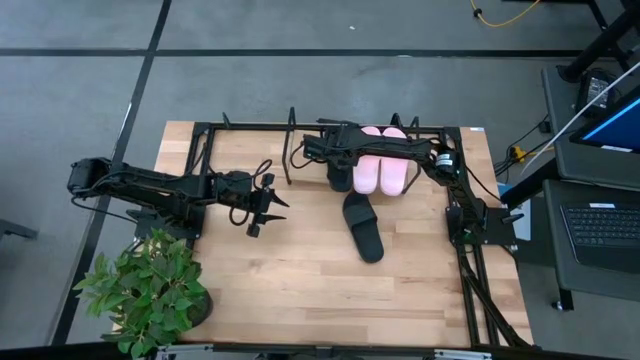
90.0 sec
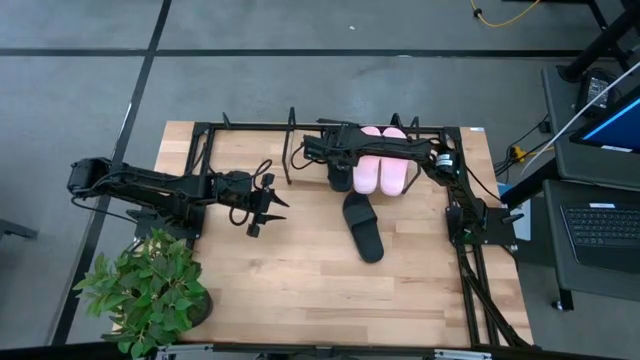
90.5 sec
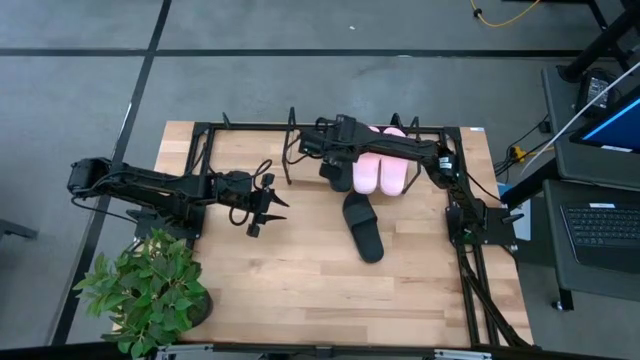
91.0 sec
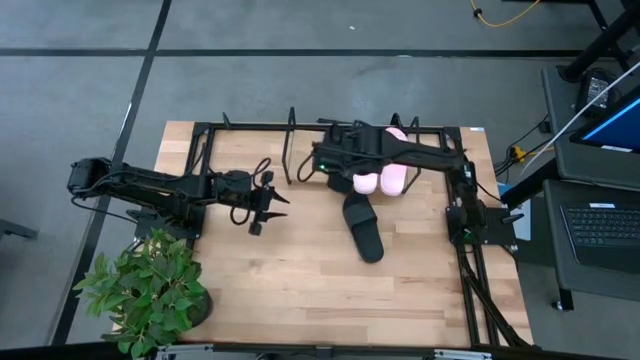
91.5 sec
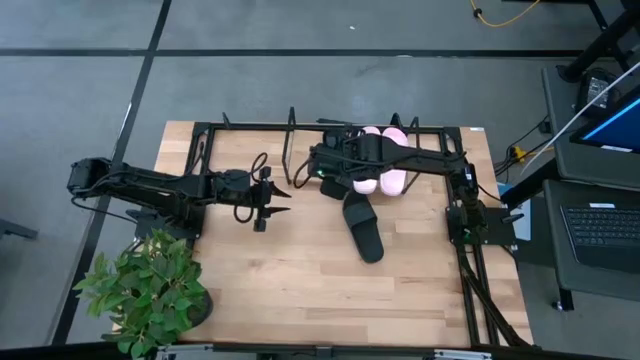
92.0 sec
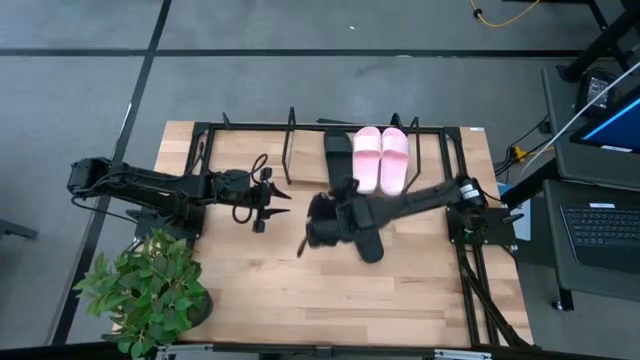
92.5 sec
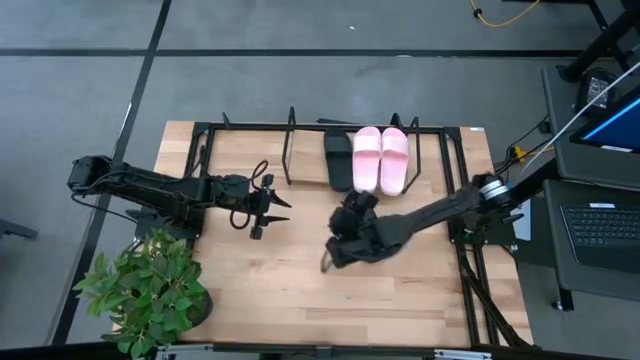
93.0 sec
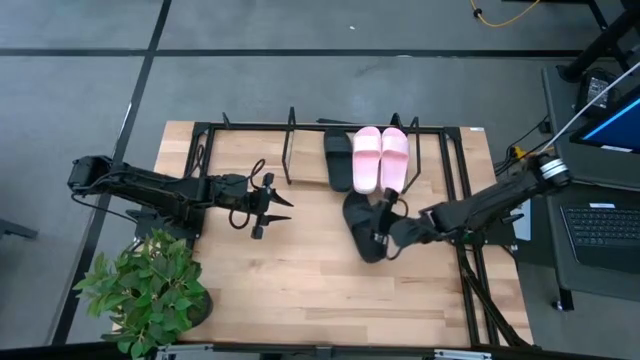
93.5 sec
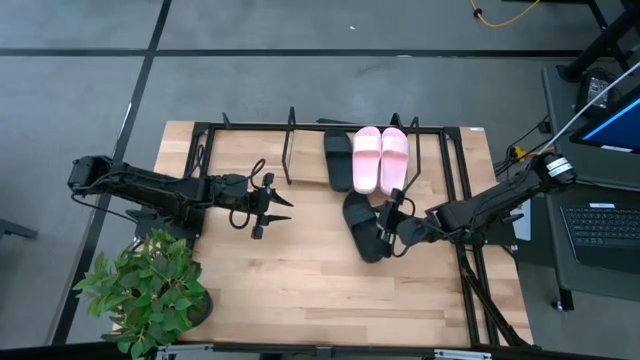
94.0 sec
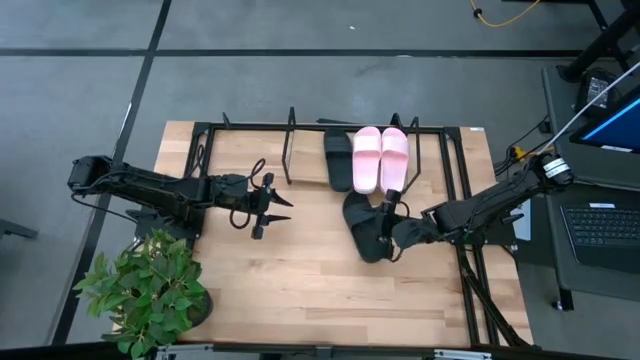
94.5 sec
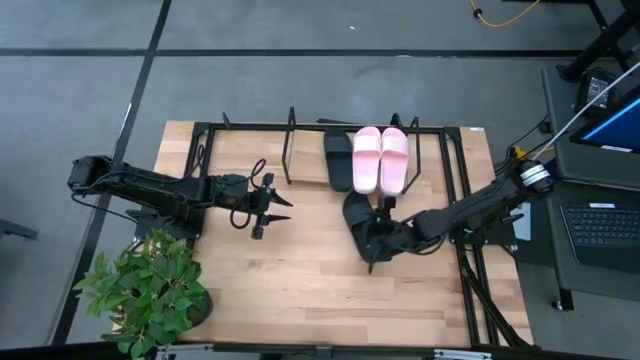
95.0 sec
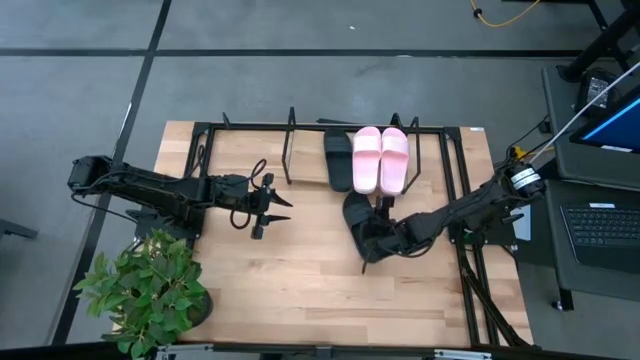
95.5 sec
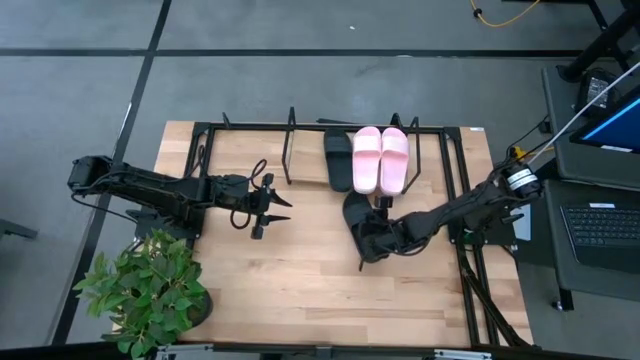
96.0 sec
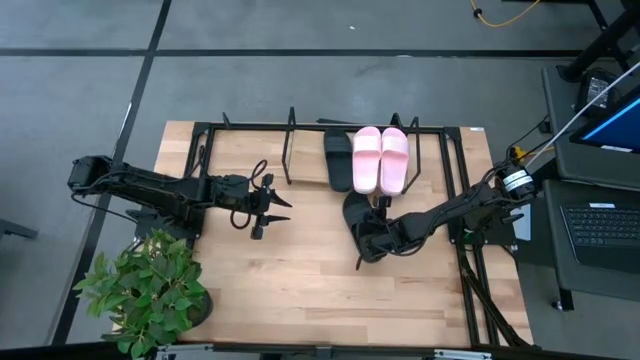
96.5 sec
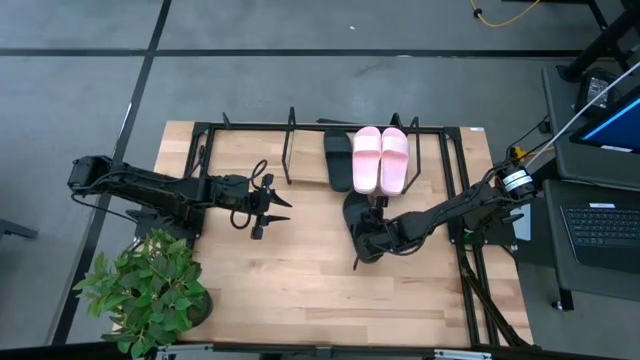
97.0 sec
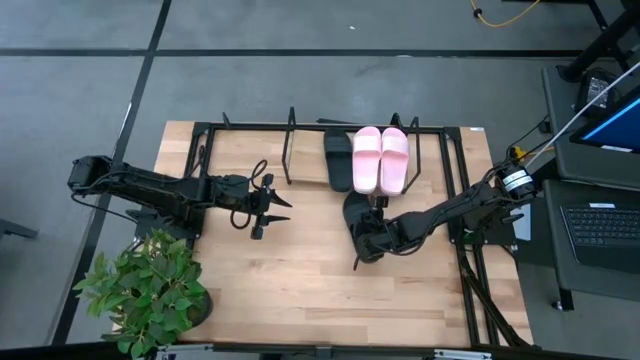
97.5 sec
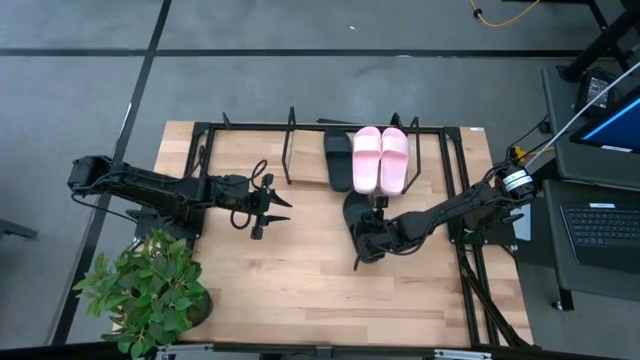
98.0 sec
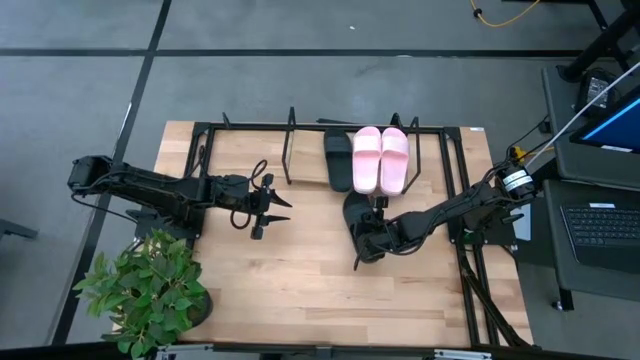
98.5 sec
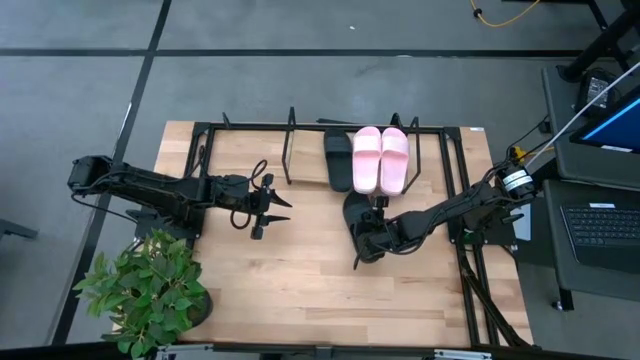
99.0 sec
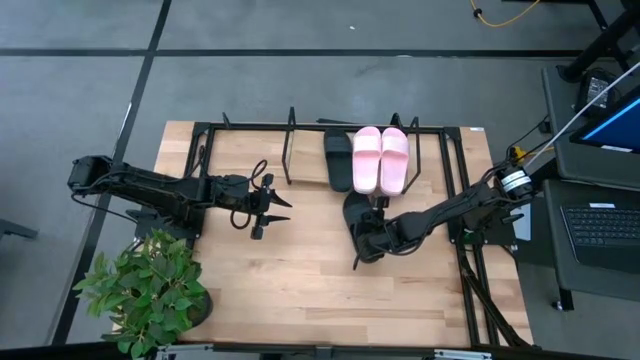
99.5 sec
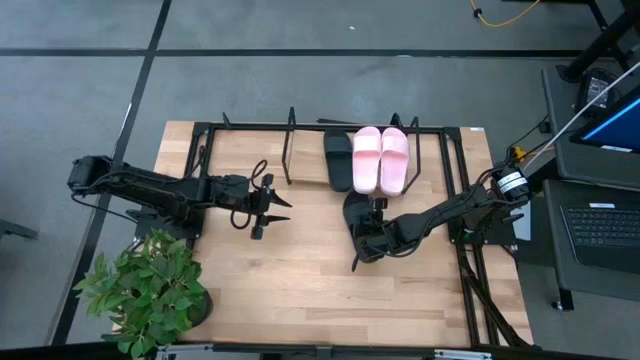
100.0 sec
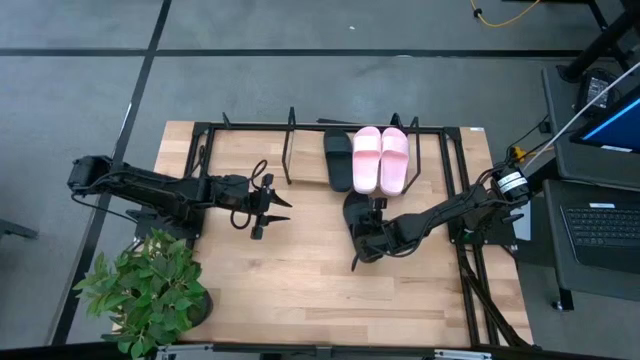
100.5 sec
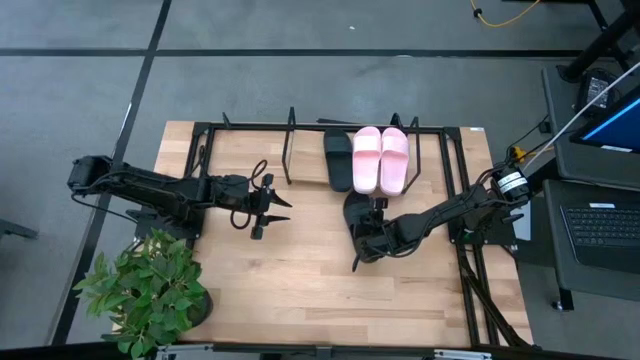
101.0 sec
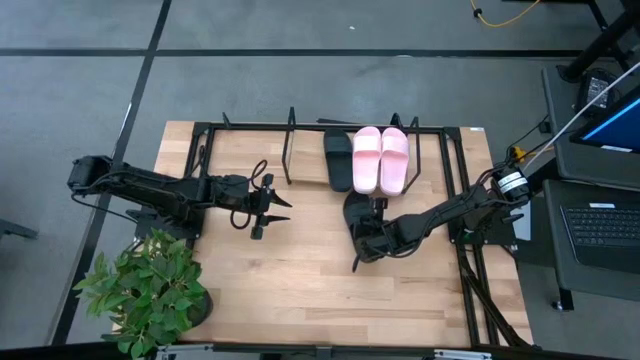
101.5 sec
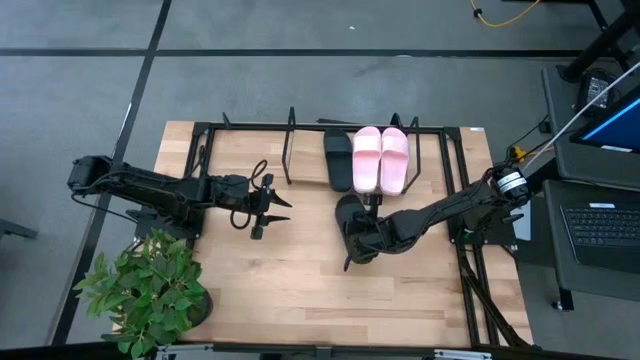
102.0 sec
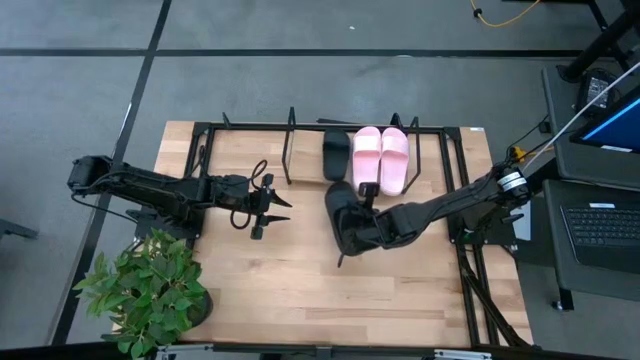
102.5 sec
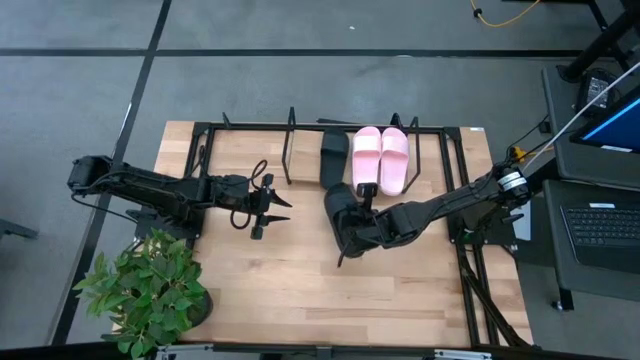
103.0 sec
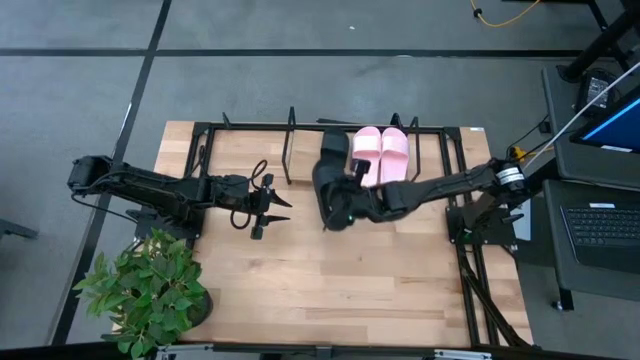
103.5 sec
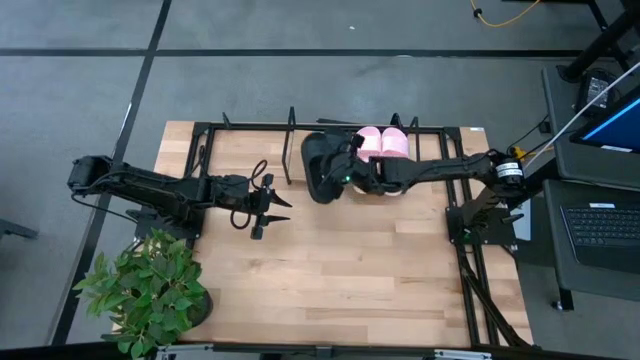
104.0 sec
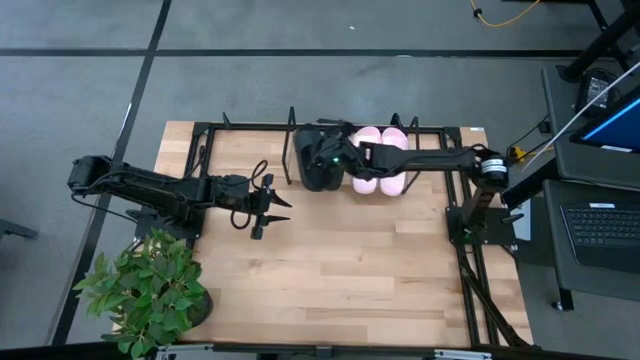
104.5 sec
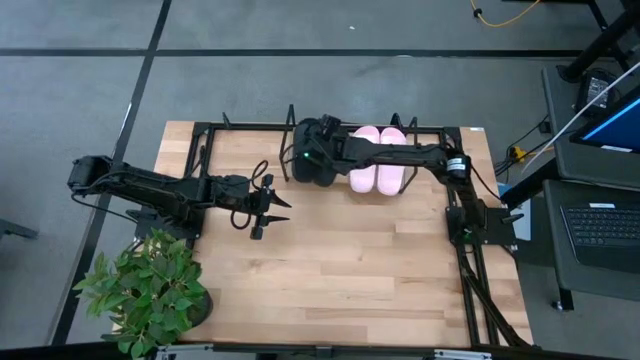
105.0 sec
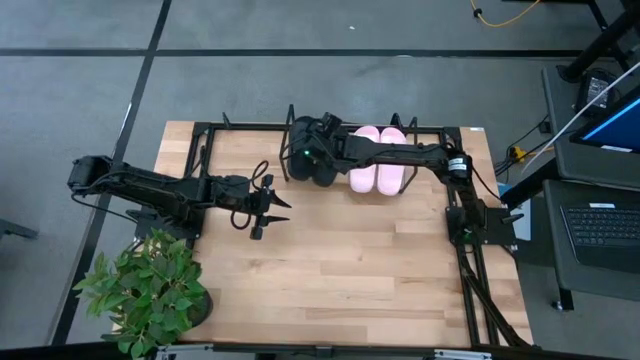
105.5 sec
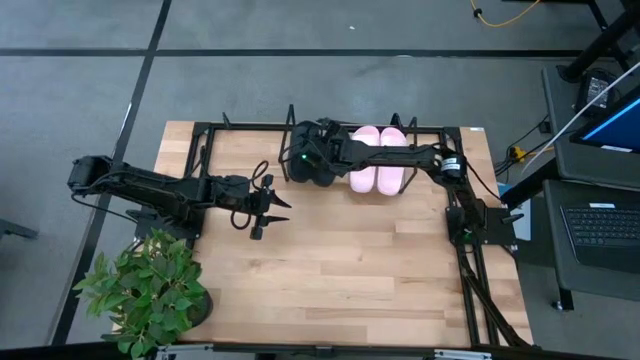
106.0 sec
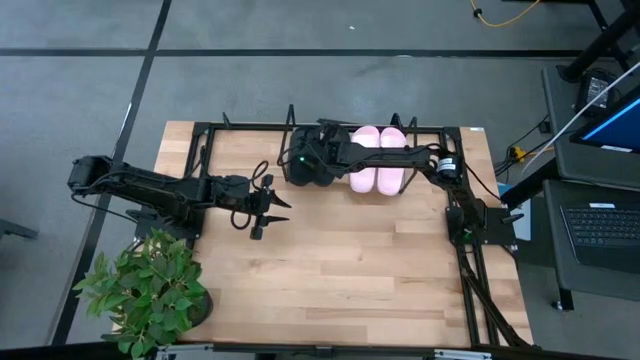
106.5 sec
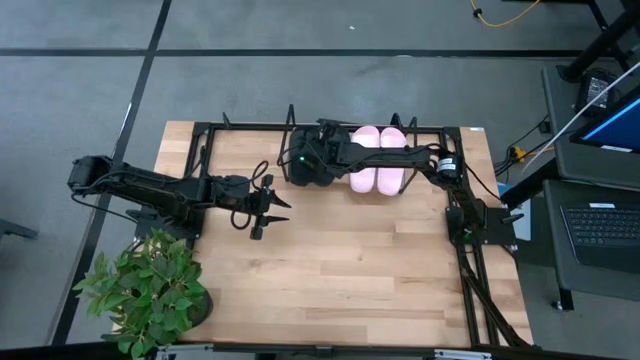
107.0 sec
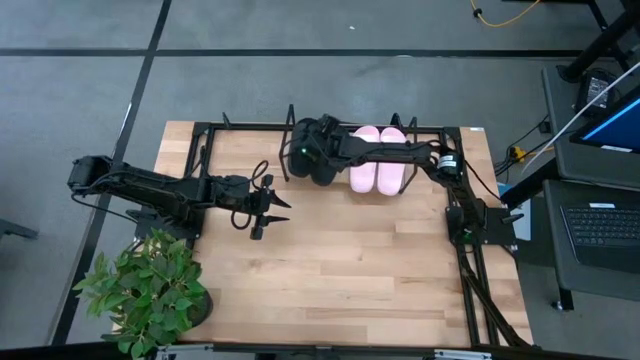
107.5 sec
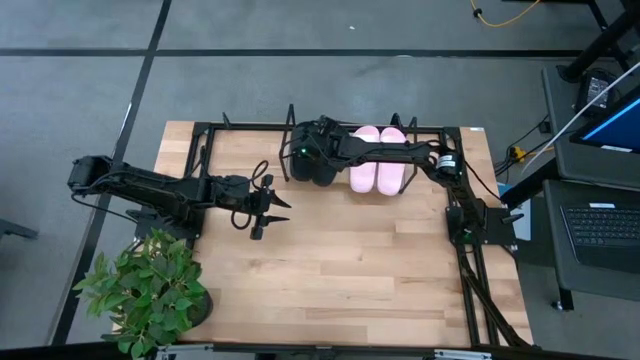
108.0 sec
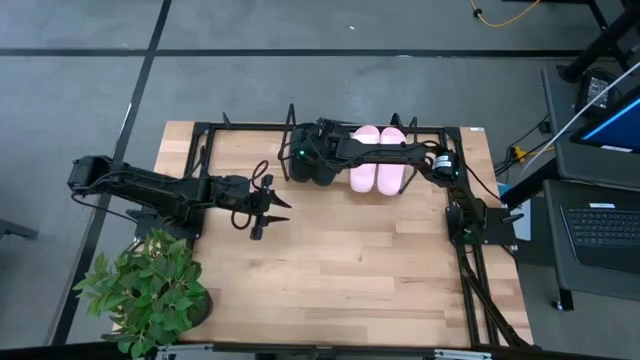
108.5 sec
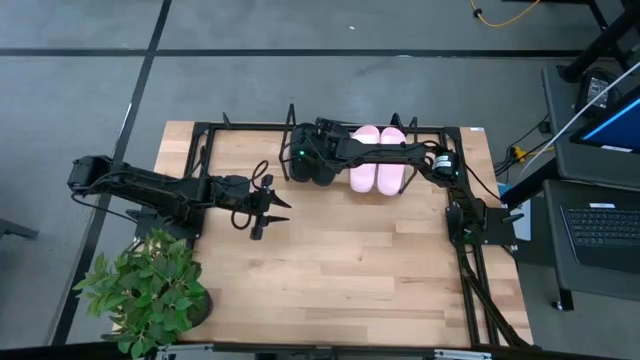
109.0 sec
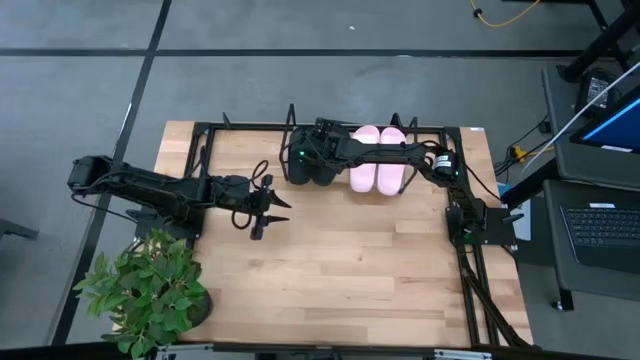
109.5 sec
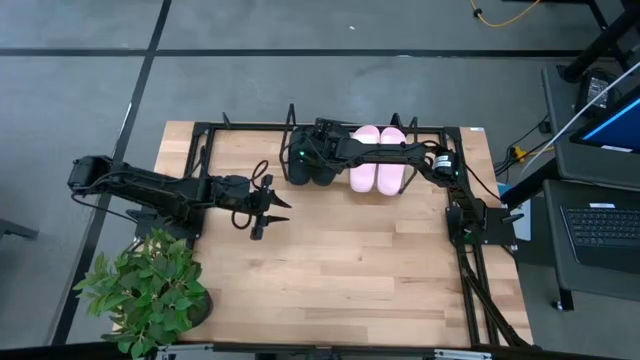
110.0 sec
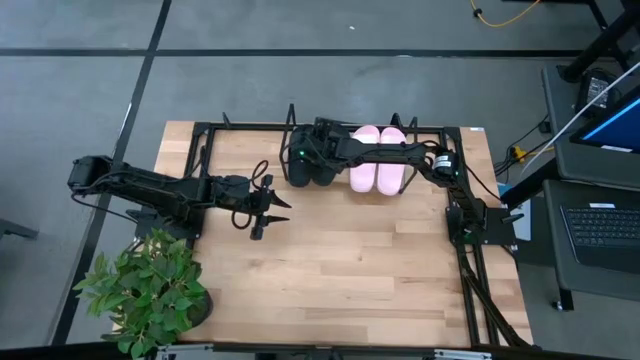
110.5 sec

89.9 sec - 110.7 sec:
Task: Pick and place slides into the shelf
Put the black slide on the shelf
